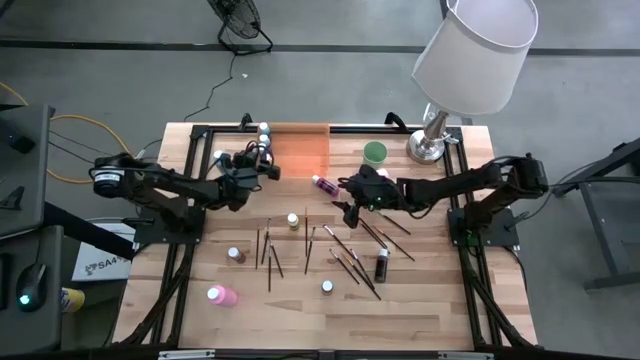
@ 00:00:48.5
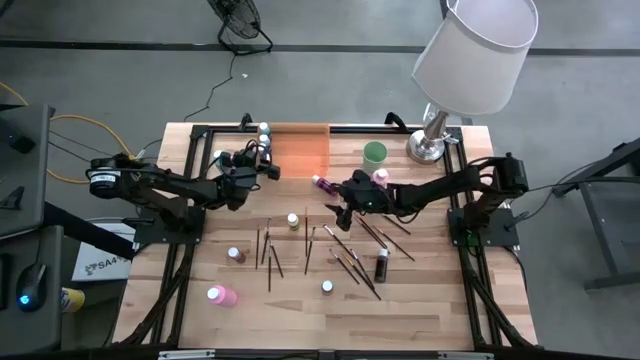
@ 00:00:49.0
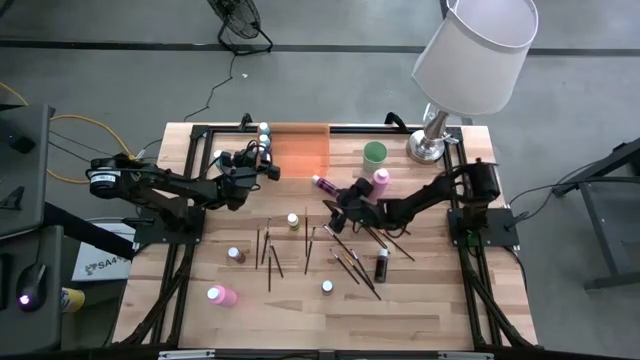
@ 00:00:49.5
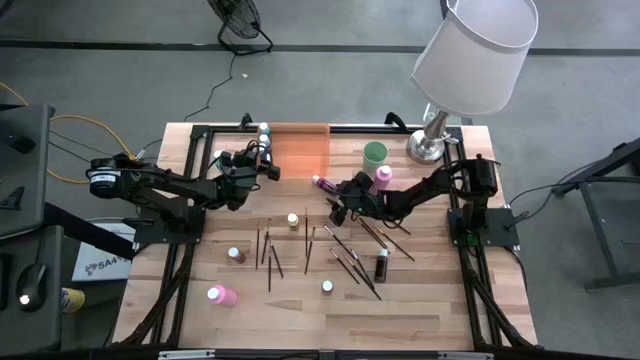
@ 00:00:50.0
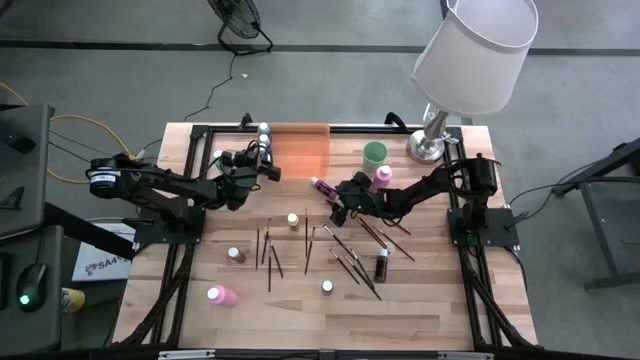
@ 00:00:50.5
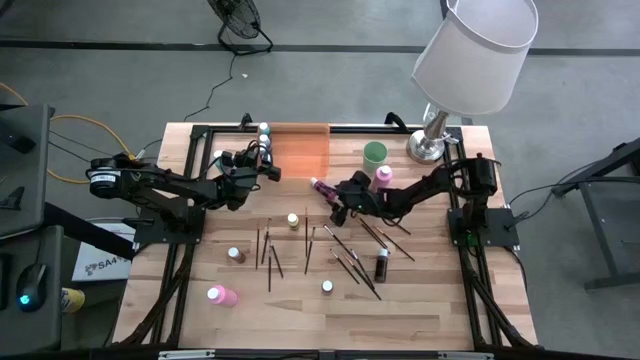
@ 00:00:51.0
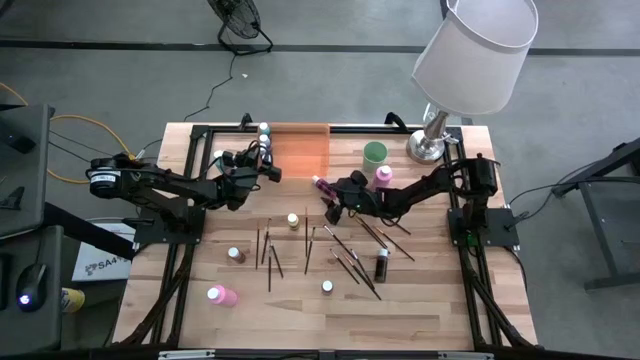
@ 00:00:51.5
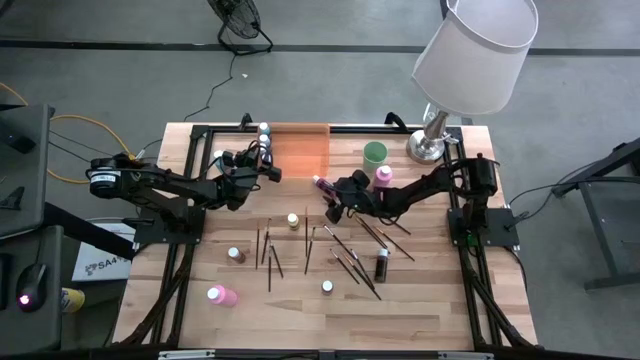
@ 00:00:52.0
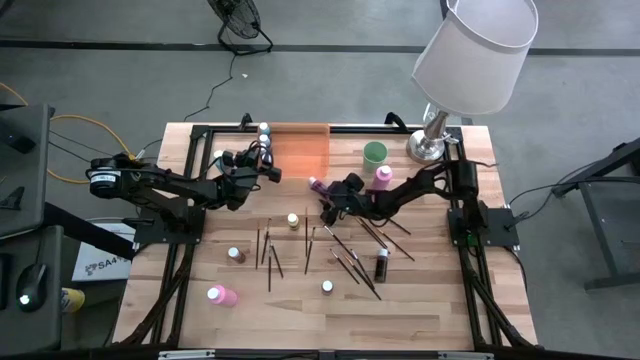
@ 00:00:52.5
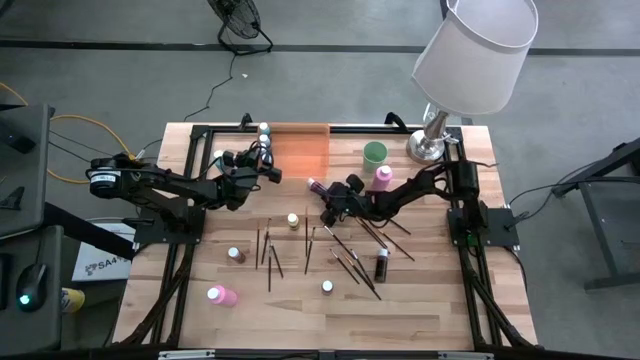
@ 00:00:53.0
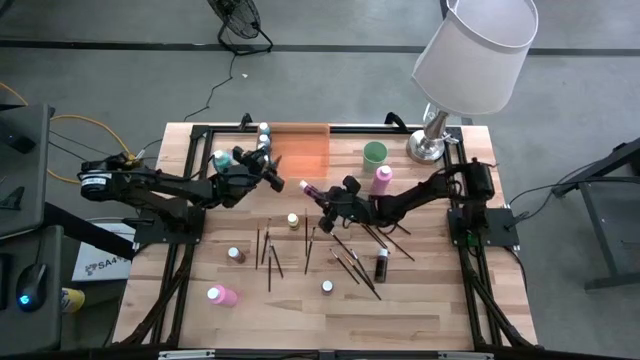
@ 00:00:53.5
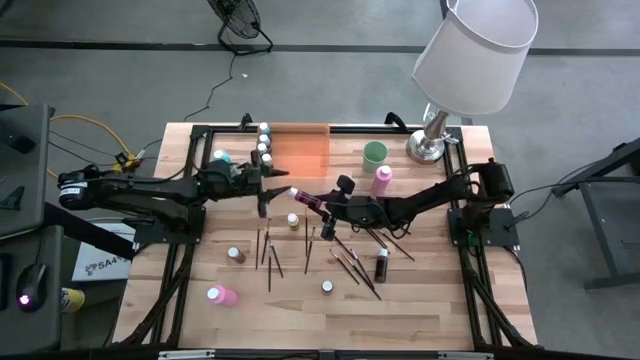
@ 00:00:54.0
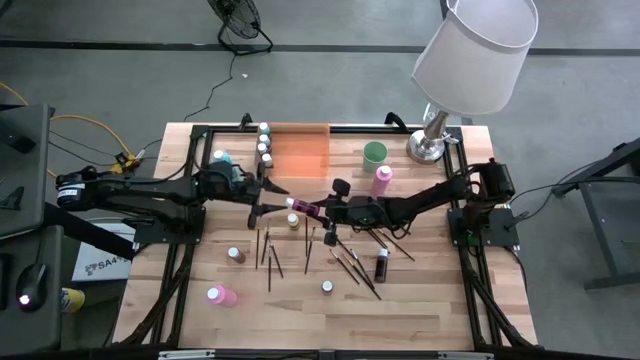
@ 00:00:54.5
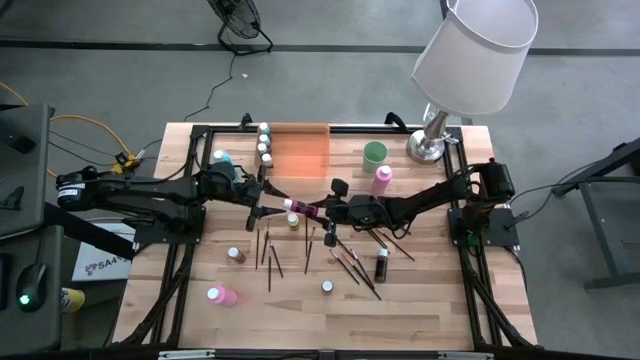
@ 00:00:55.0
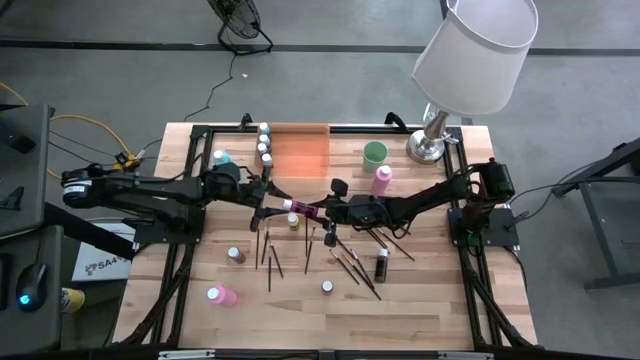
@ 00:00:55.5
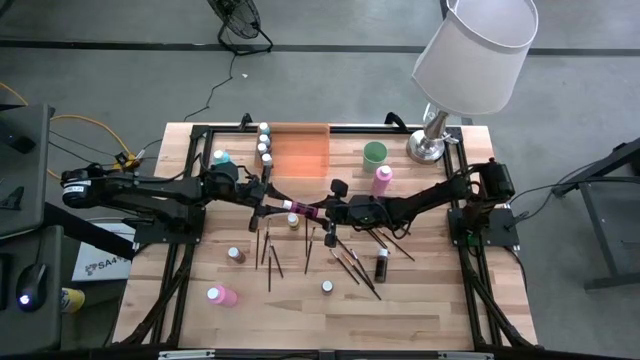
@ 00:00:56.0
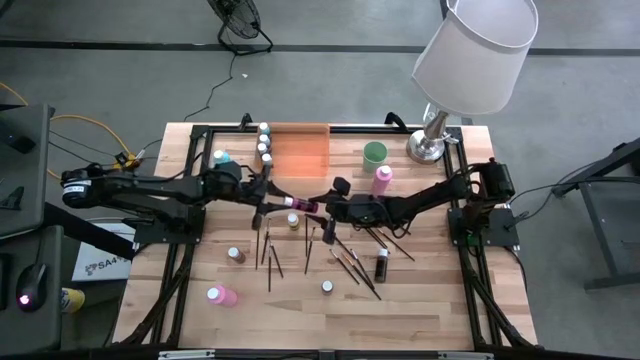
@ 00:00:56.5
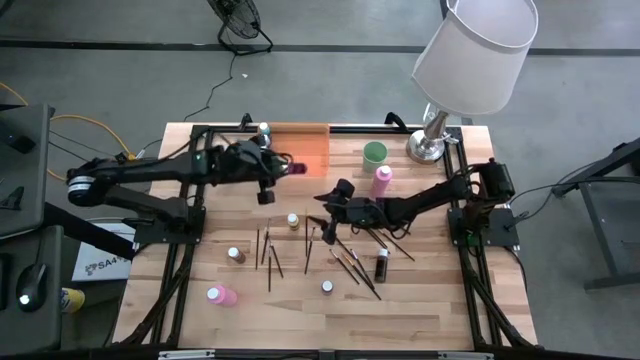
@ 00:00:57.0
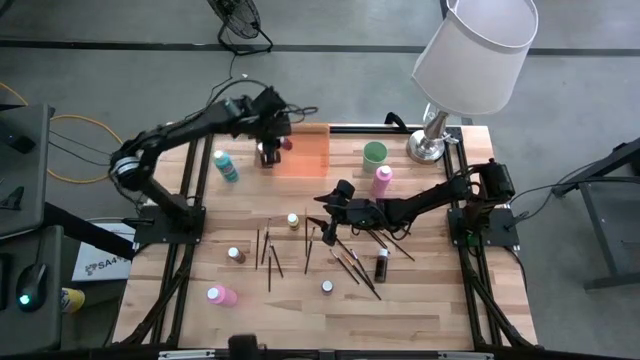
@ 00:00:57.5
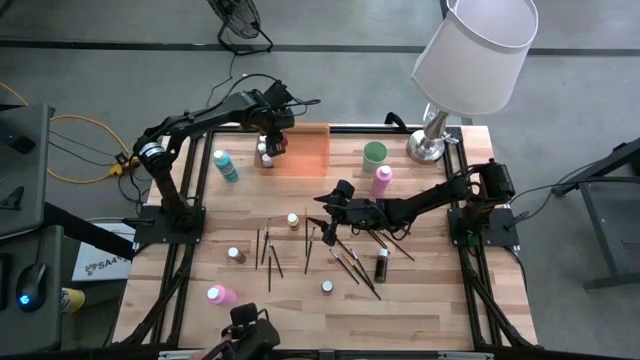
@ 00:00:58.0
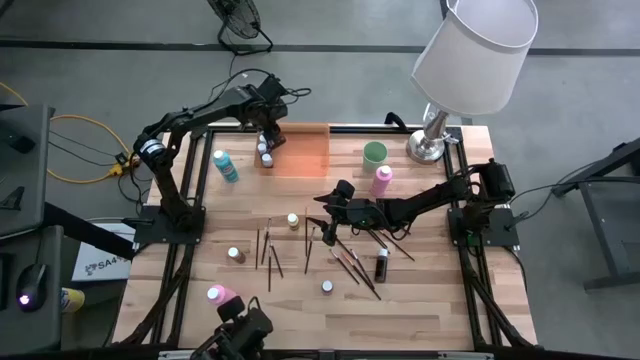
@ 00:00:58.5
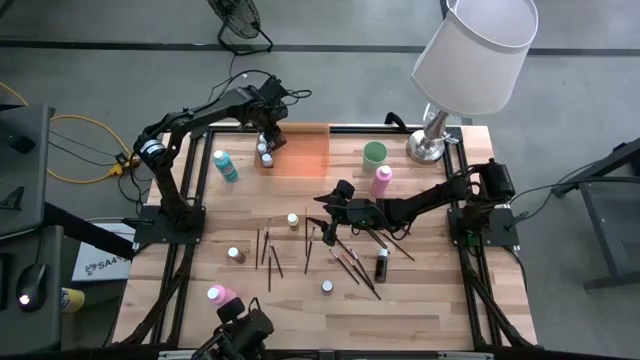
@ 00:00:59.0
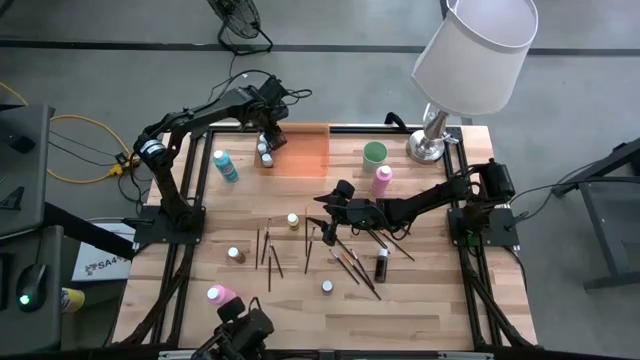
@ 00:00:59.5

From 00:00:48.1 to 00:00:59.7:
Task: Pick & Place Paint Supplies
Put the small pink paint bottle into the orange bin

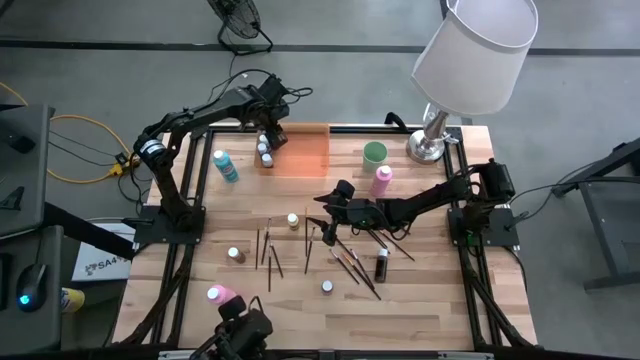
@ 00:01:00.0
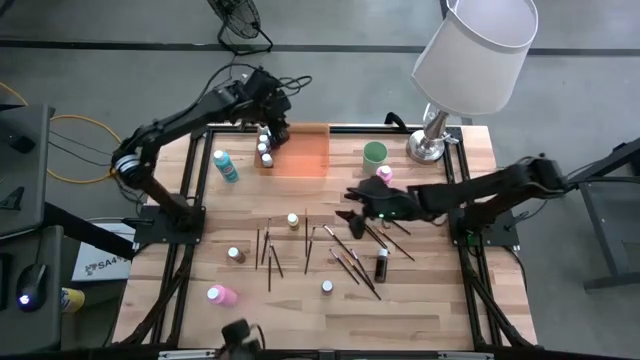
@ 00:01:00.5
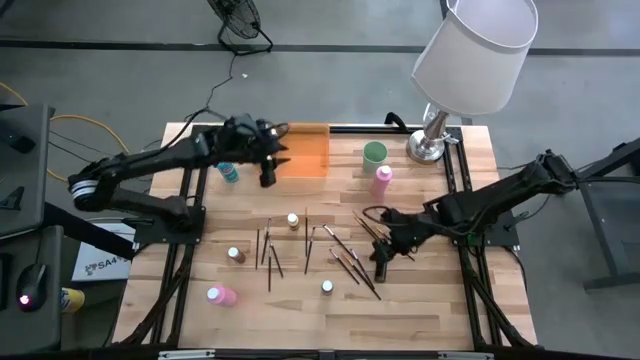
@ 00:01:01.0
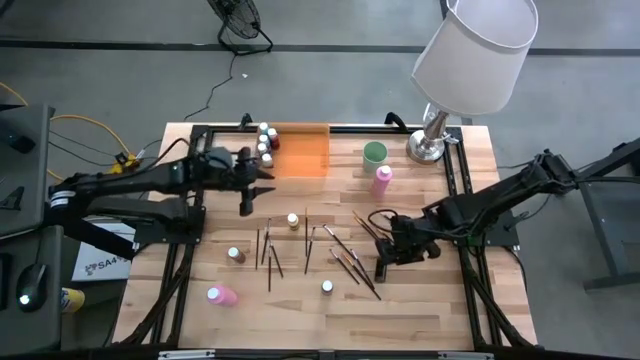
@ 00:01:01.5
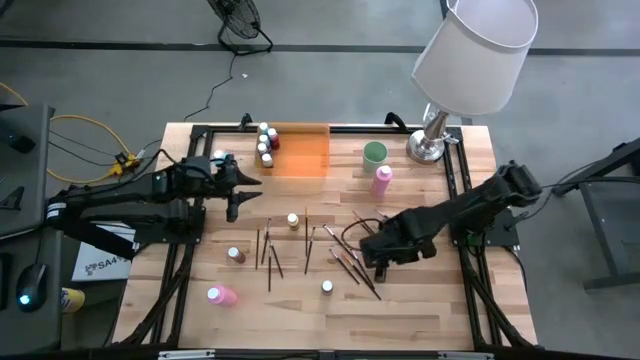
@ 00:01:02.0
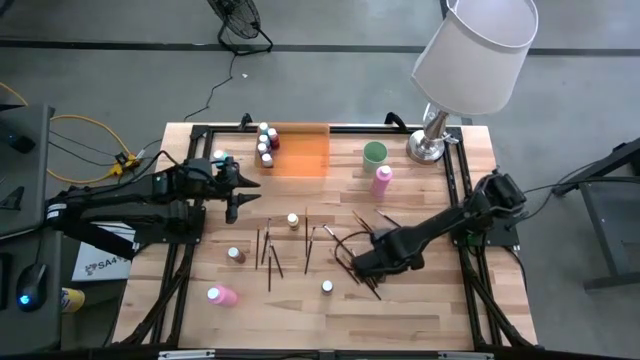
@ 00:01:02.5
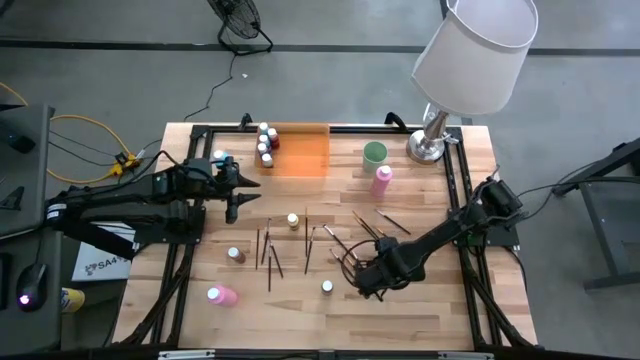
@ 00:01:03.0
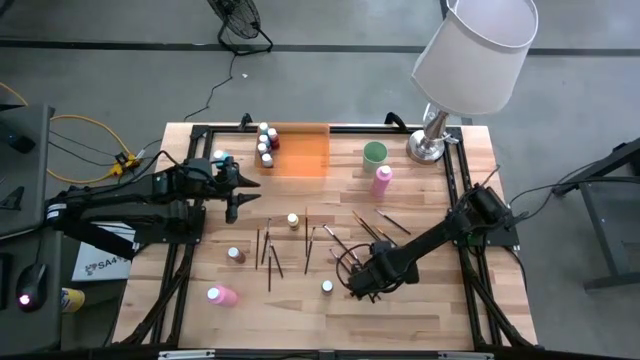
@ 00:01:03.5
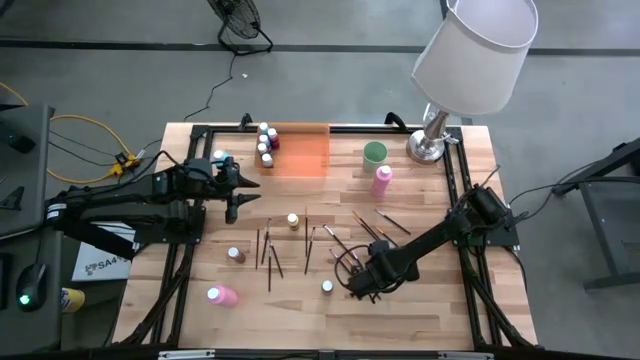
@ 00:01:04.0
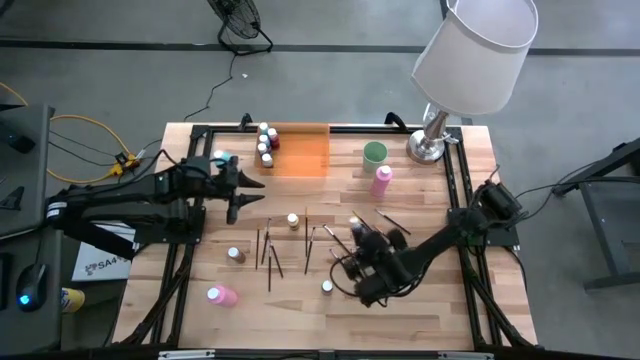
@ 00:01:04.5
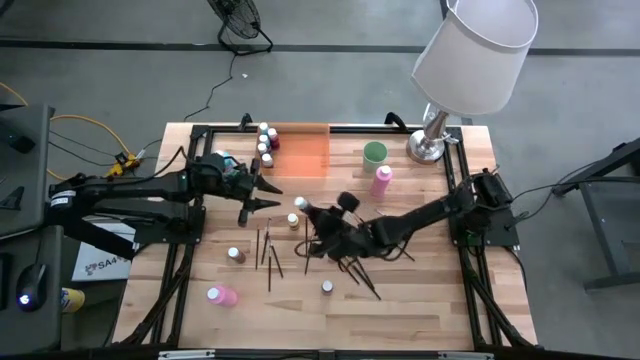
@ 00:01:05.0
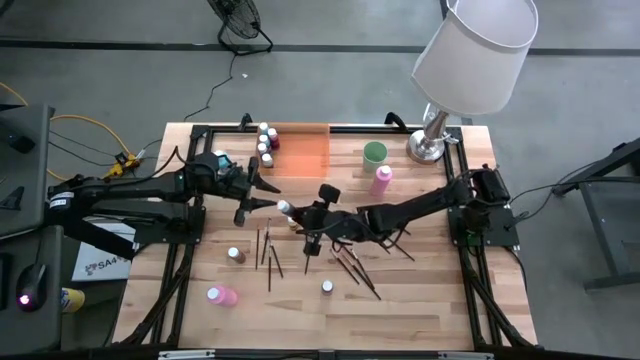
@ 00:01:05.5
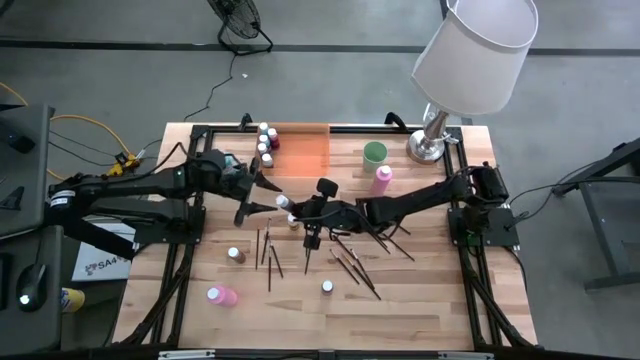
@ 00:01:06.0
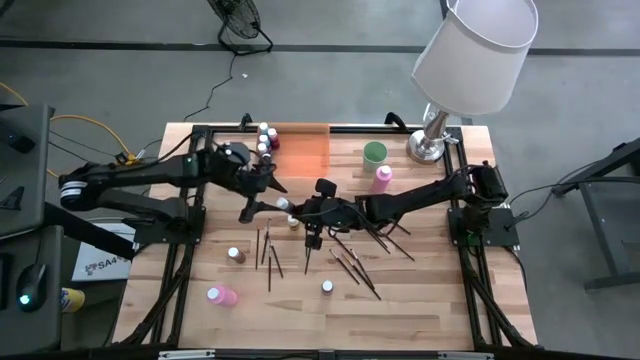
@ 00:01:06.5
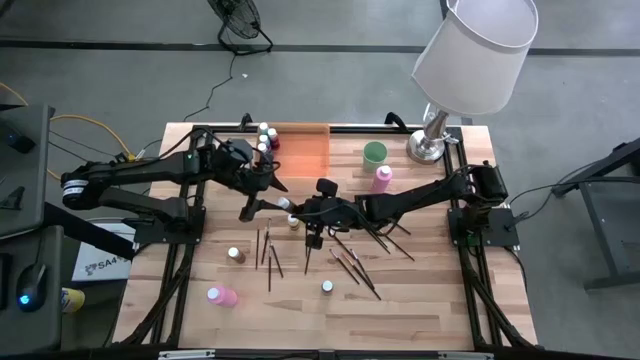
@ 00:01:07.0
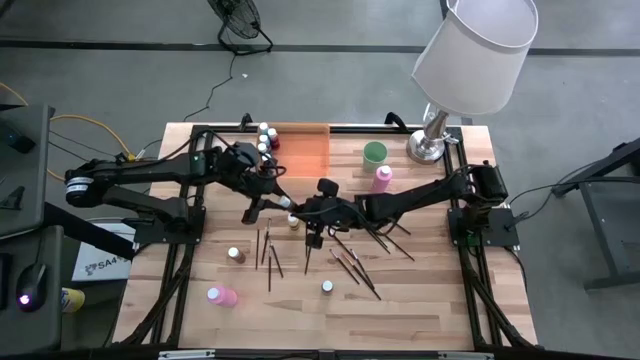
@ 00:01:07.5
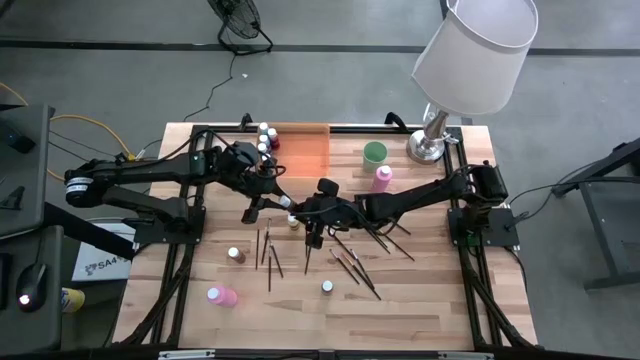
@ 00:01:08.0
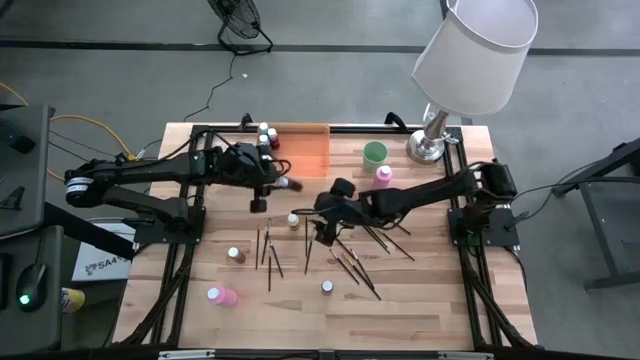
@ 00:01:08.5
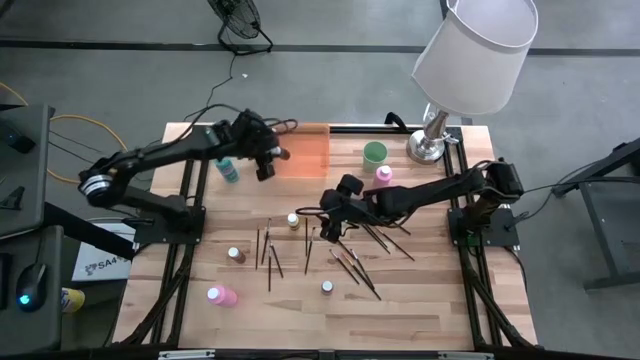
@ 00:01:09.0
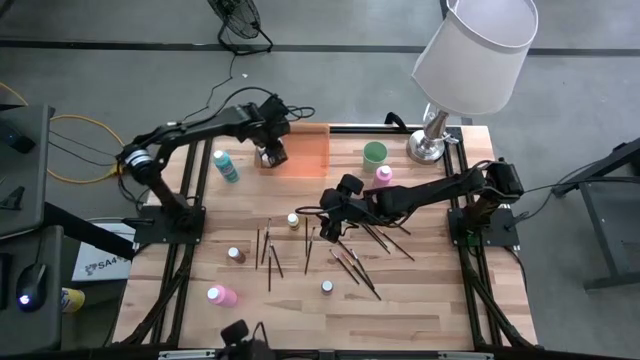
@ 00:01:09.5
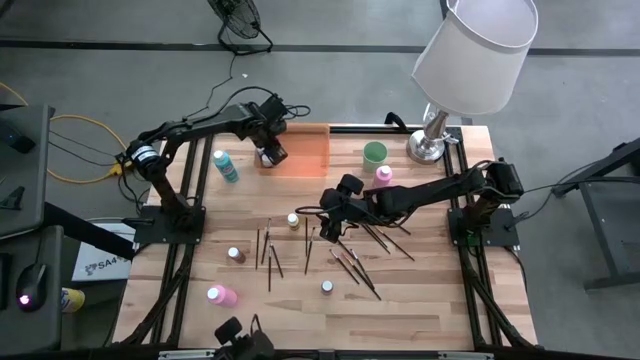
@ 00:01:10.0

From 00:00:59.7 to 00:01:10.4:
Put the dark brown paint bottle into the orange bin
